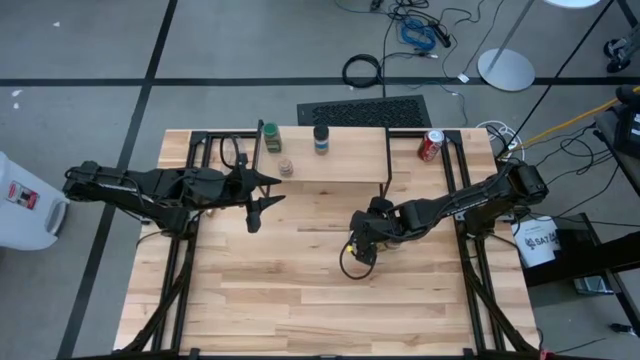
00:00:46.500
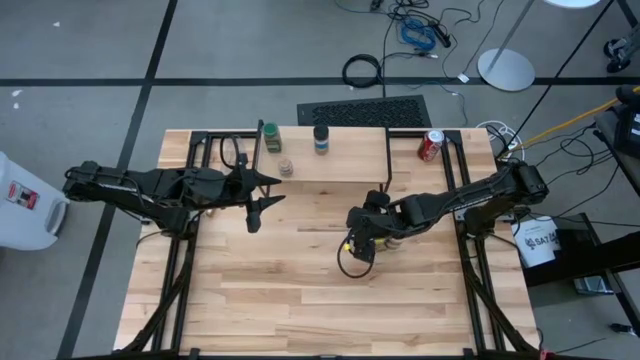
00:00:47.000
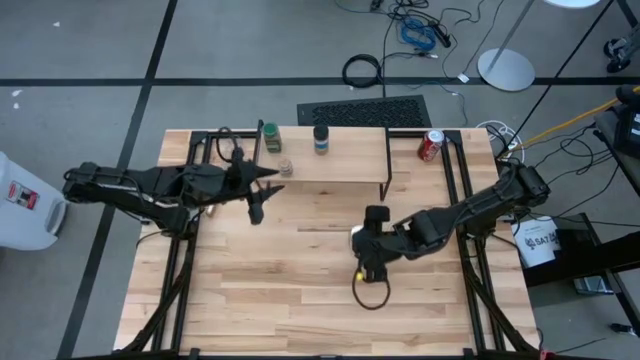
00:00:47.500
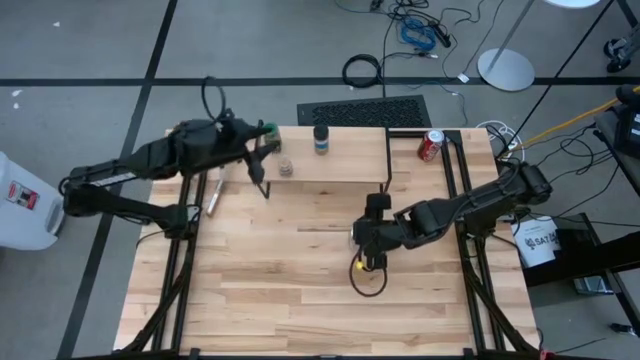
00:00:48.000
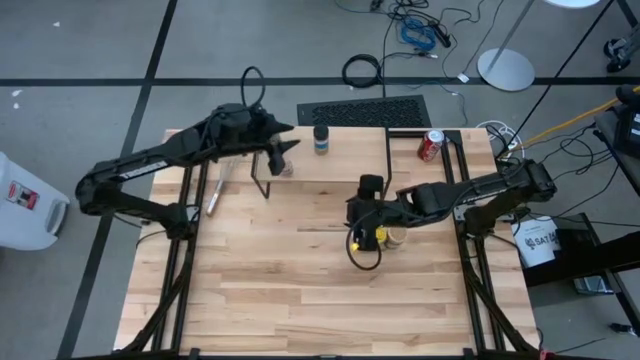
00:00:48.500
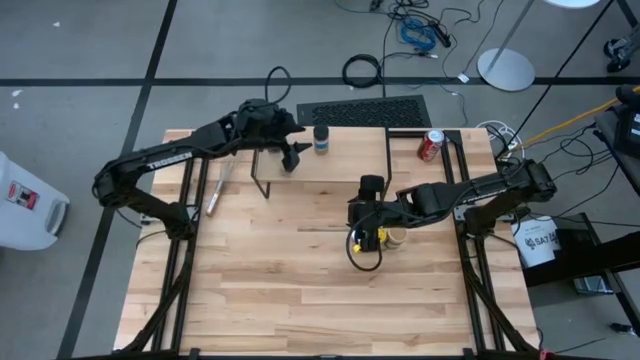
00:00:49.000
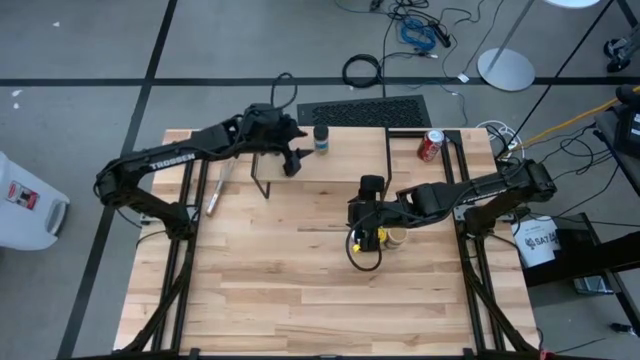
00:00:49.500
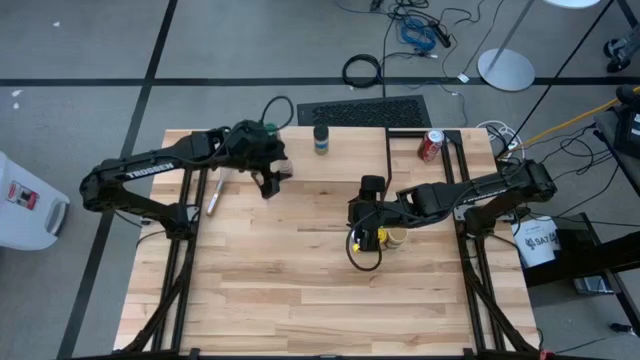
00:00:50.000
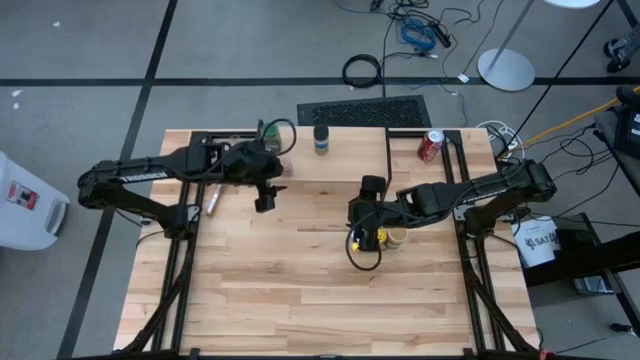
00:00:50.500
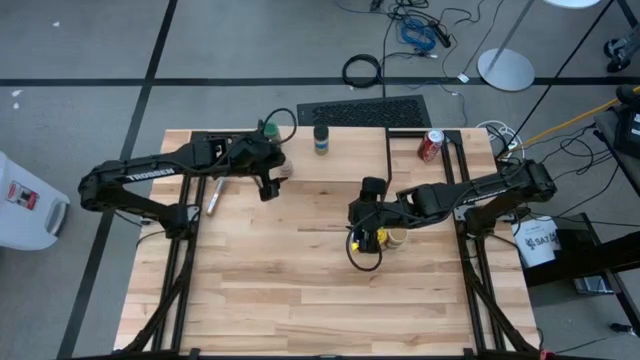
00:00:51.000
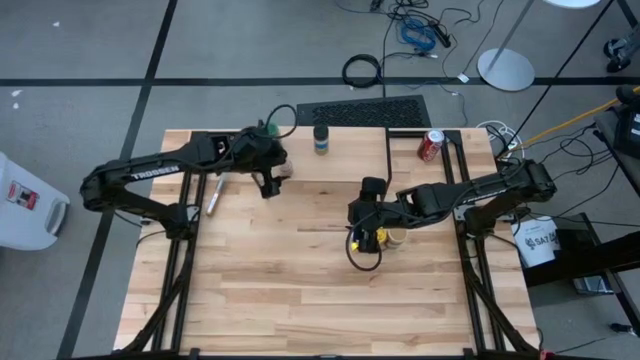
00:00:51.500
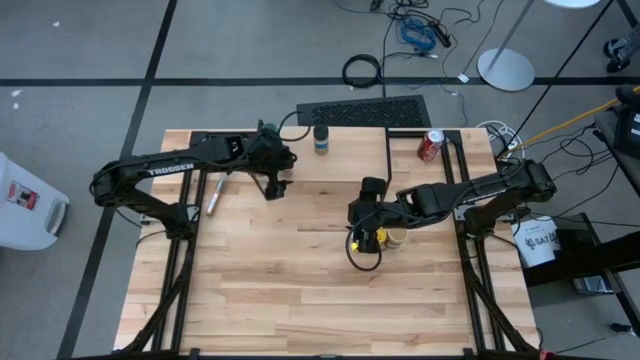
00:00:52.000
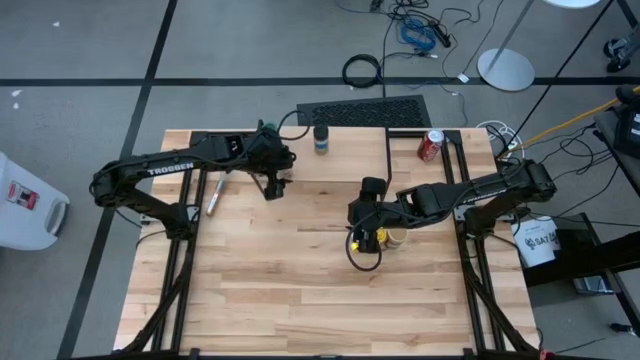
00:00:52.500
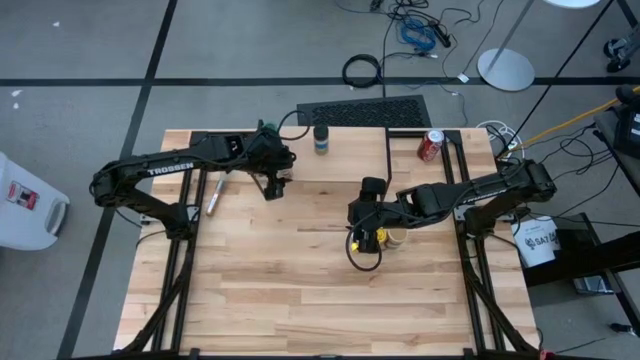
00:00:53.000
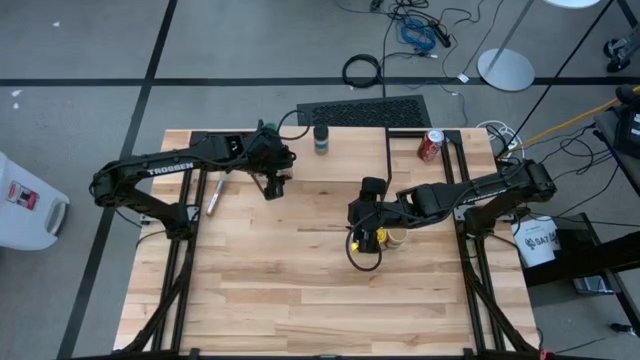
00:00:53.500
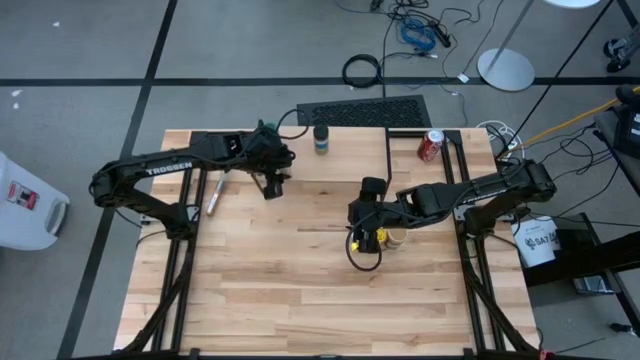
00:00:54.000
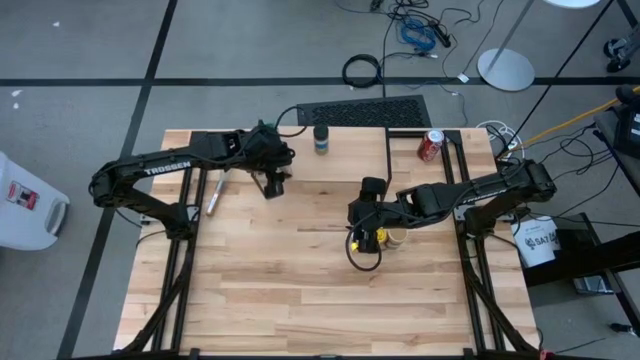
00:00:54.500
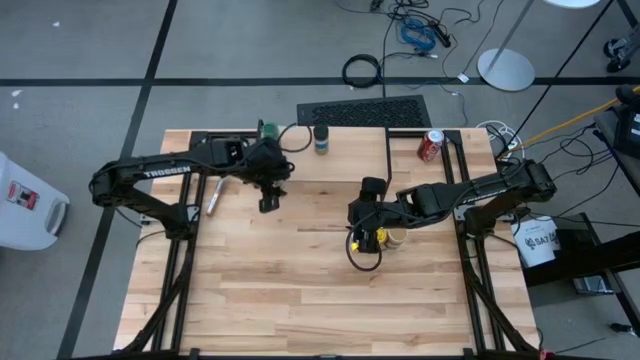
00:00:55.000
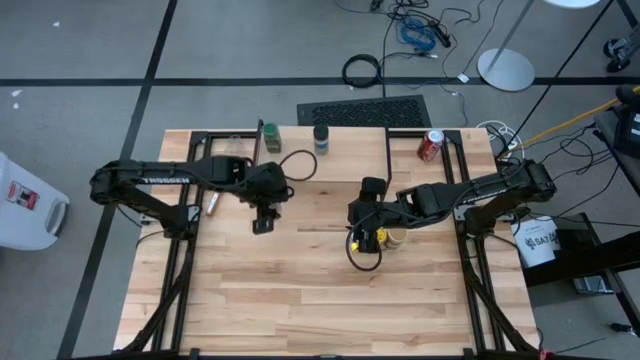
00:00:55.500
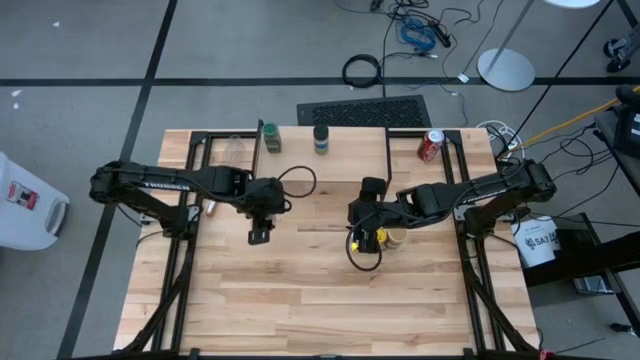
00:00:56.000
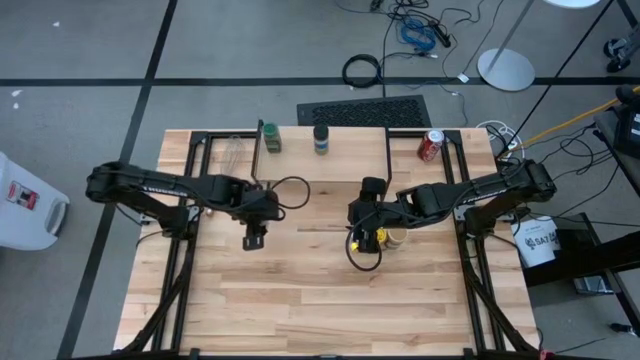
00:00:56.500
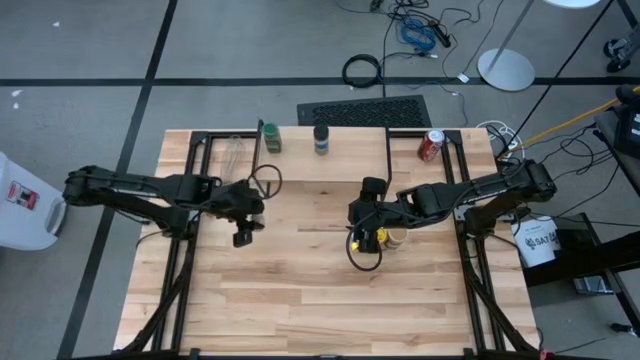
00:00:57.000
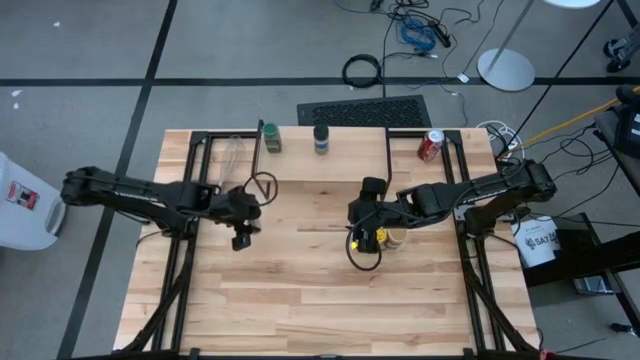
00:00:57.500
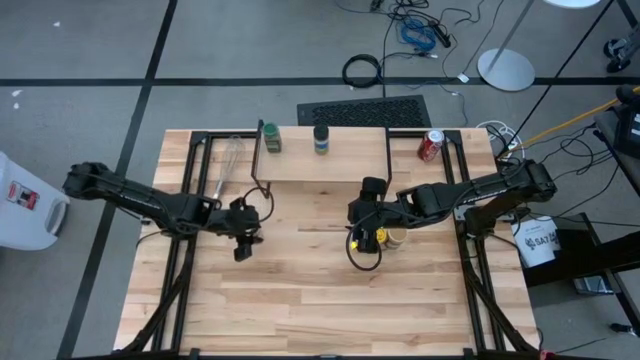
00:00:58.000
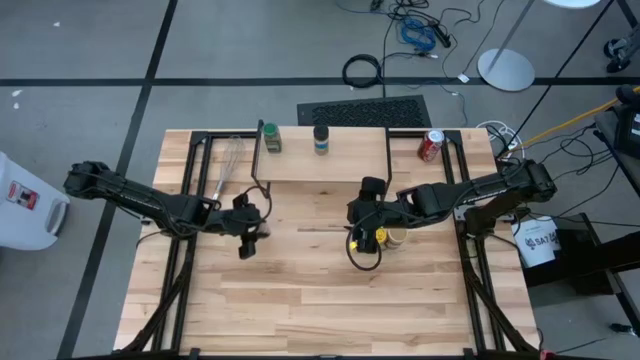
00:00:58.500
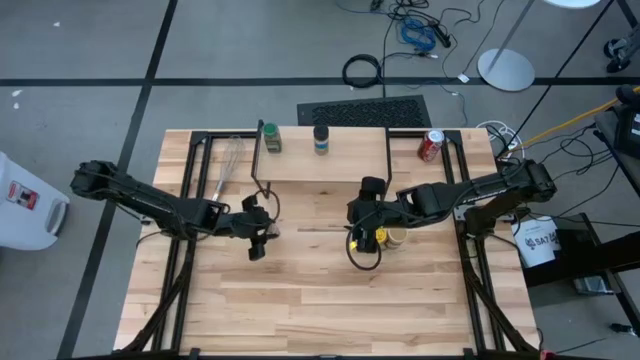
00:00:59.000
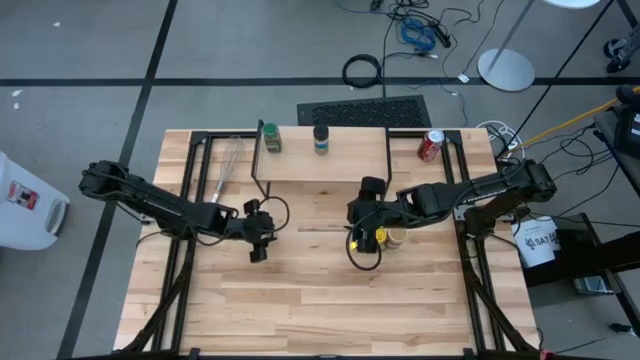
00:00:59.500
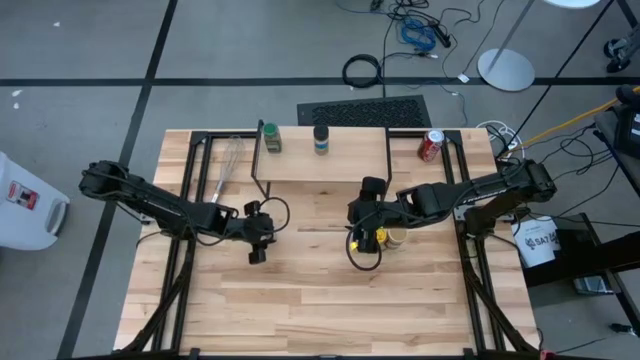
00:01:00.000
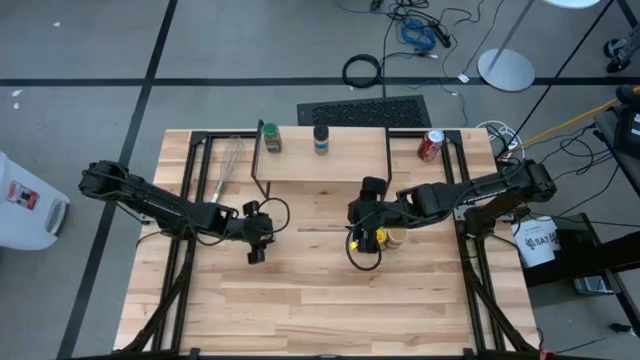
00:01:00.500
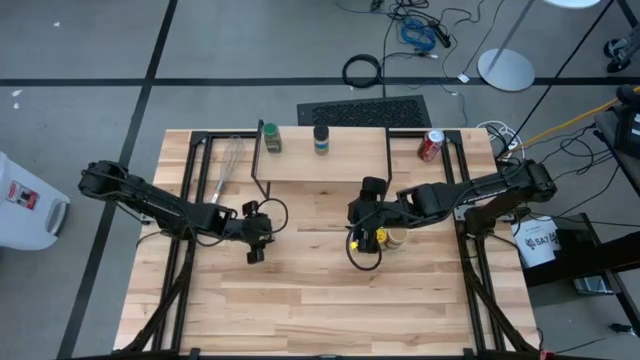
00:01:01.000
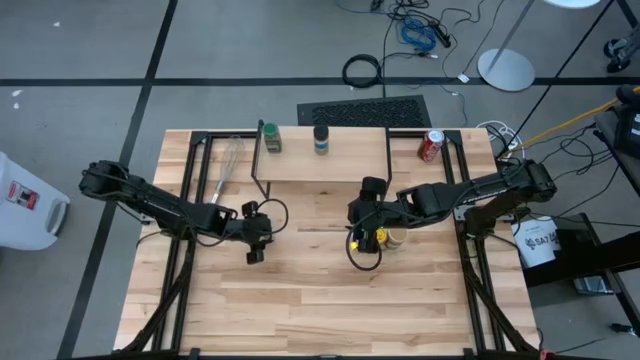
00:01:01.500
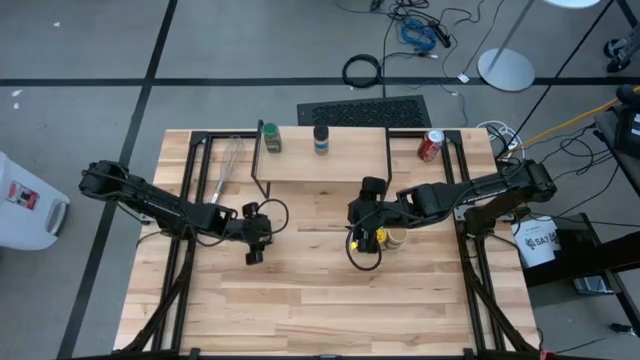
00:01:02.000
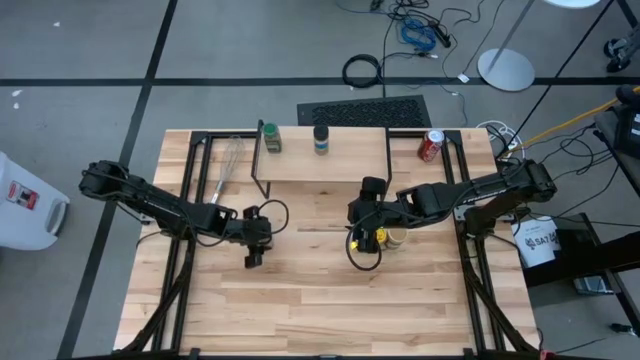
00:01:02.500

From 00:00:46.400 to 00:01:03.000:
Task: Shelf spices
Remove the brown seasoning bottle from the shelf

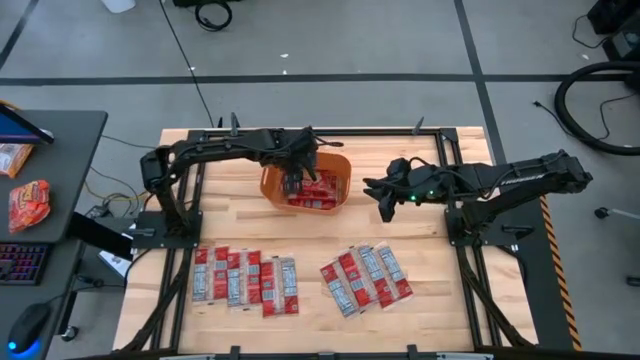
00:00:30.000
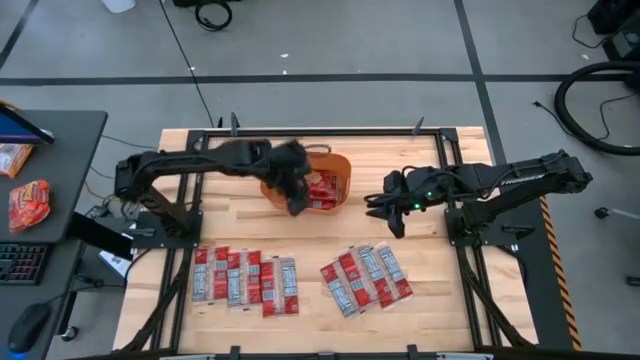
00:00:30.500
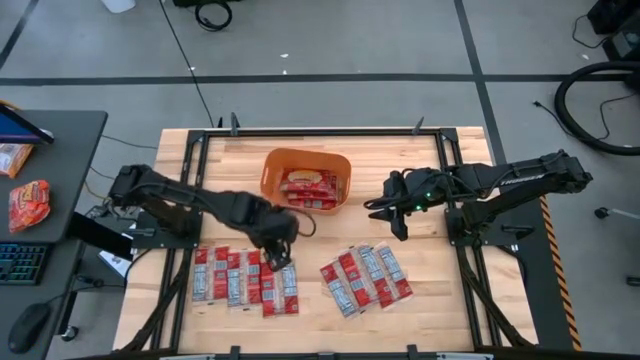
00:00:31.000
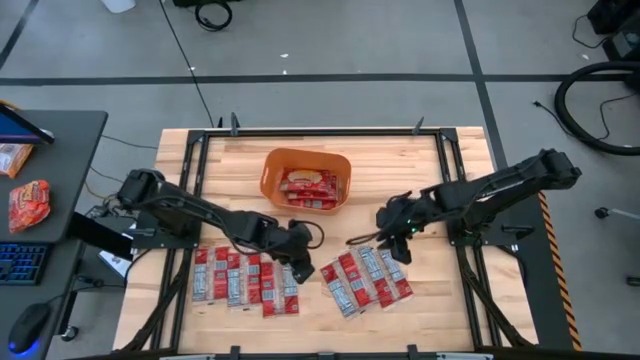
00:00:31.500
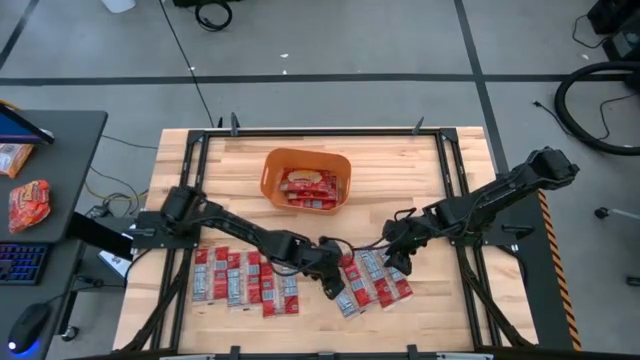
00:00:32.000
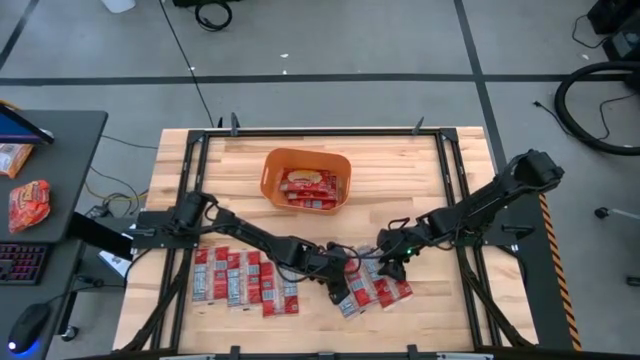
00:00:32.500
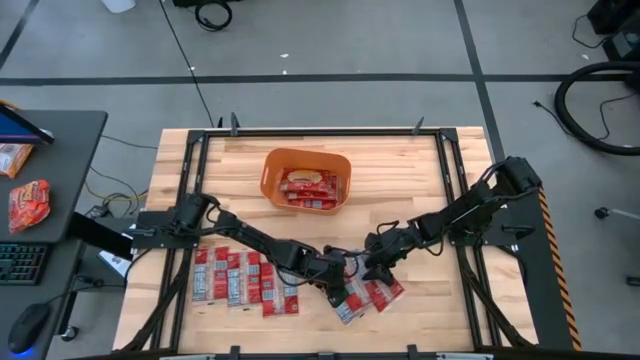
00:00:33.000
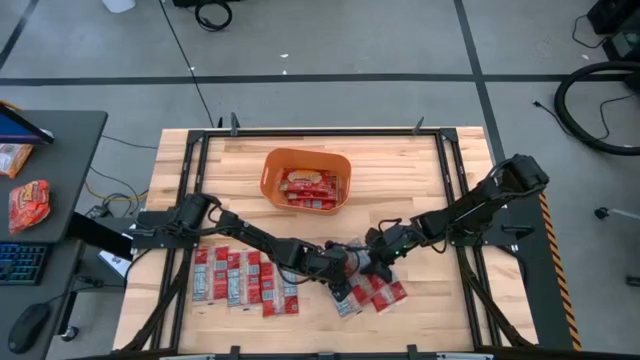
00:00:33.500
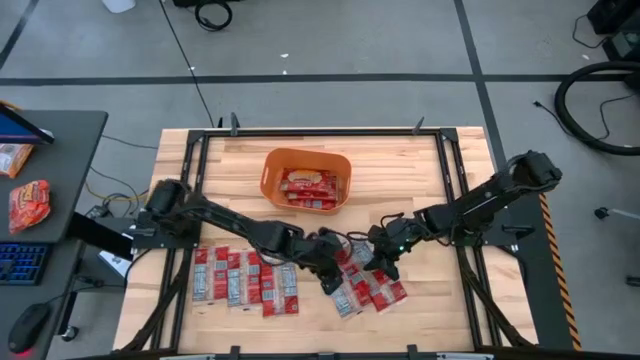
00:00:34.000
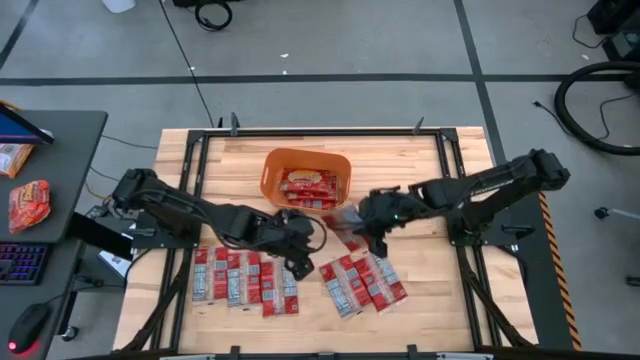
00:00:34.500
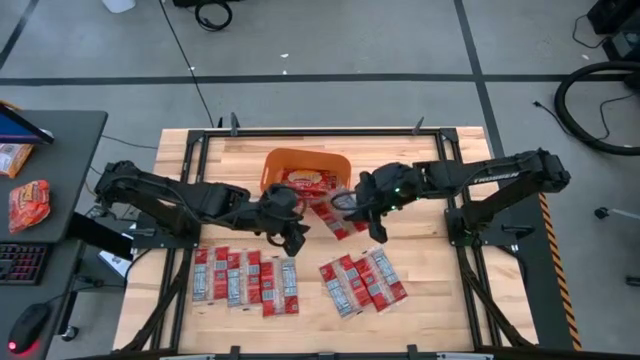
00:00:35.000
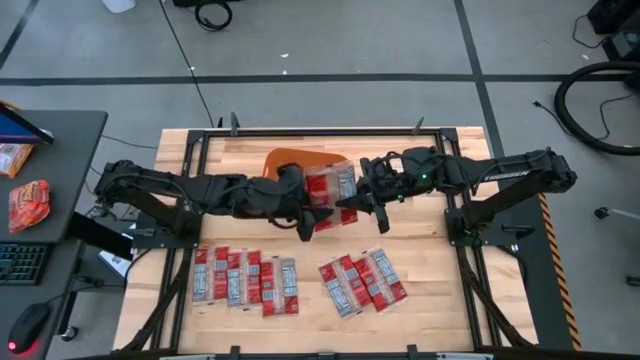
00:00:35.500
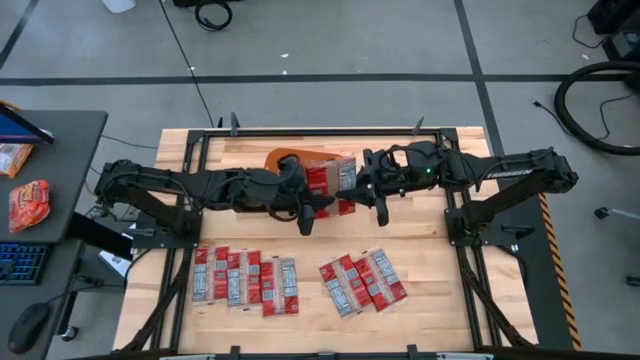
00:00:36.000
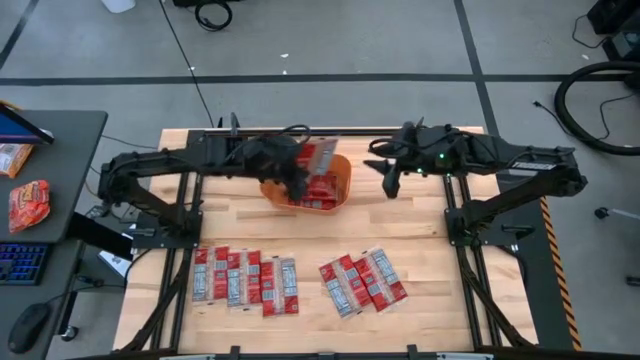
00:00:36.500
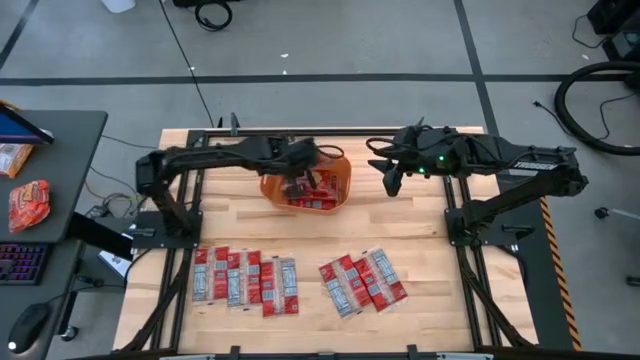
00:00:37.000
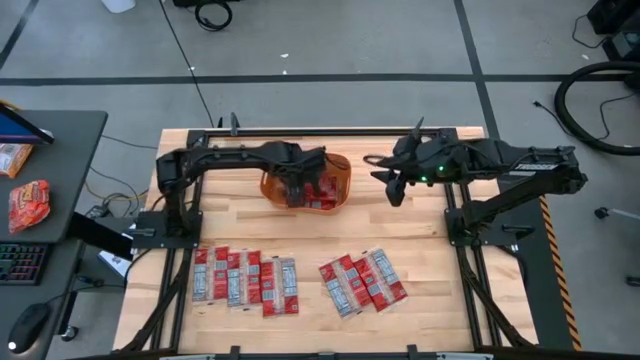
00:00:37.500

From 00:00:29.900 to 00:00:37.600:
Task: Sort popcorn bags into baskets
Put the red popcorn bag into the orange bin
